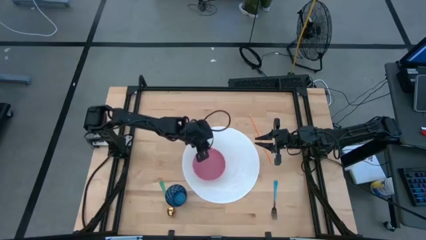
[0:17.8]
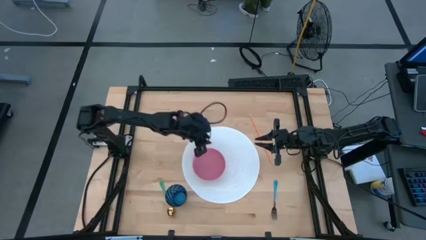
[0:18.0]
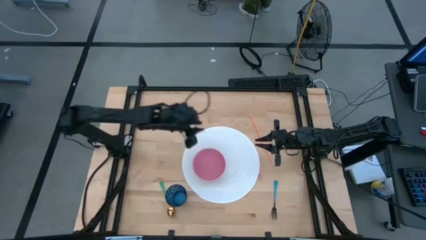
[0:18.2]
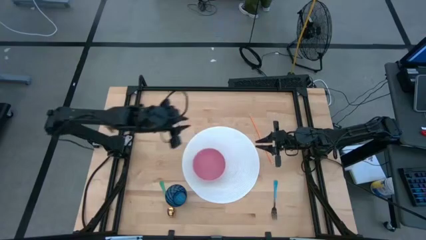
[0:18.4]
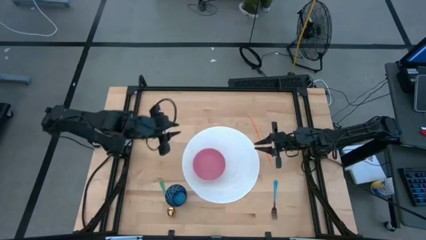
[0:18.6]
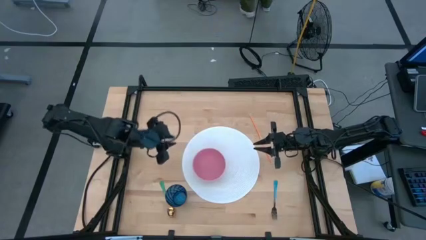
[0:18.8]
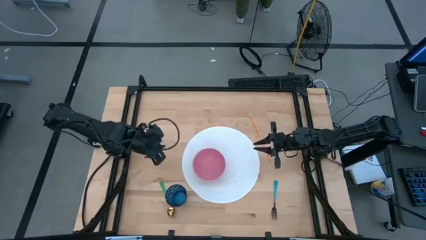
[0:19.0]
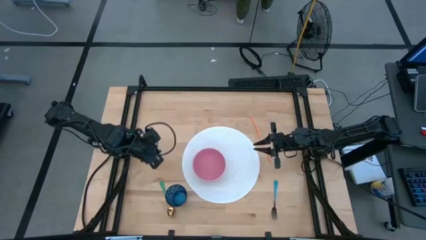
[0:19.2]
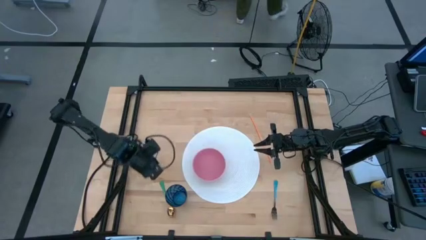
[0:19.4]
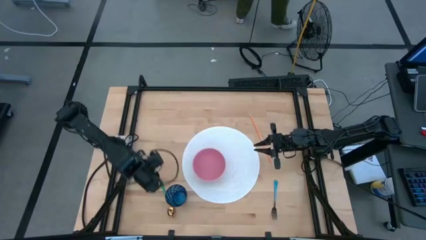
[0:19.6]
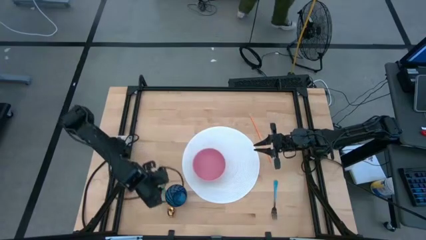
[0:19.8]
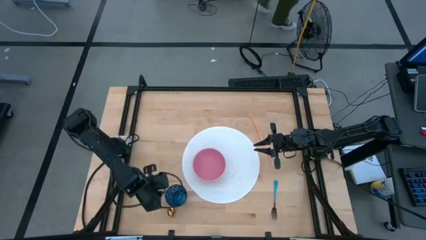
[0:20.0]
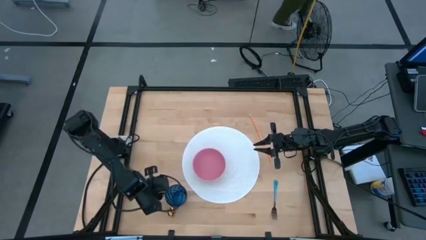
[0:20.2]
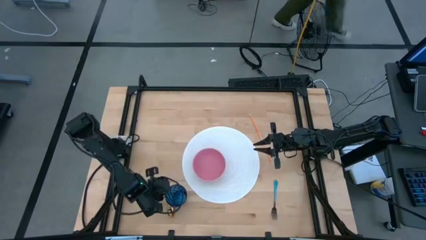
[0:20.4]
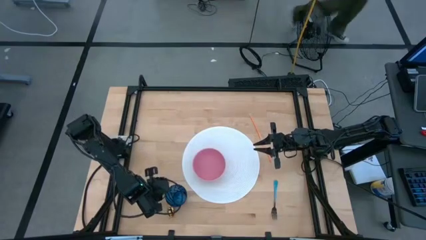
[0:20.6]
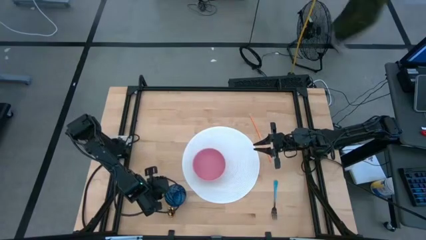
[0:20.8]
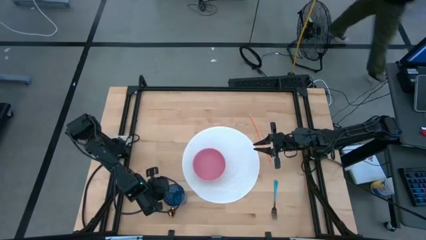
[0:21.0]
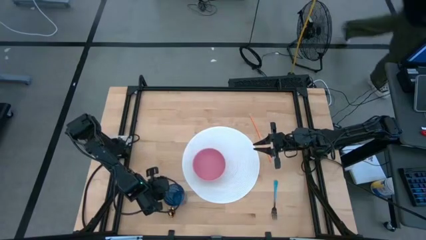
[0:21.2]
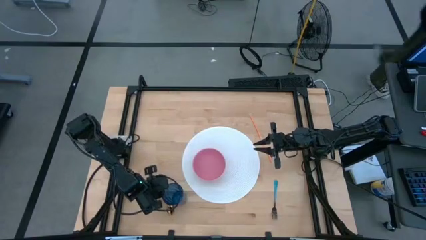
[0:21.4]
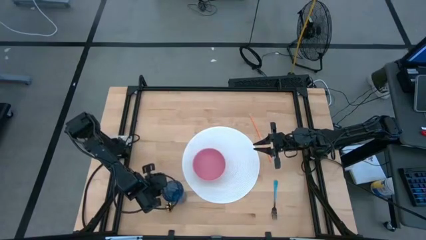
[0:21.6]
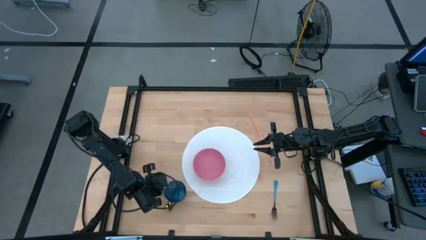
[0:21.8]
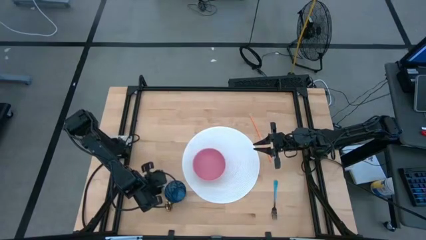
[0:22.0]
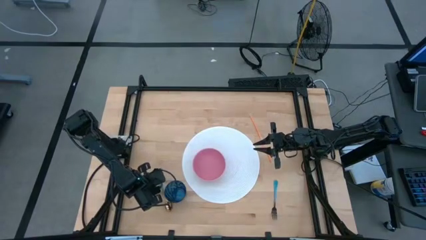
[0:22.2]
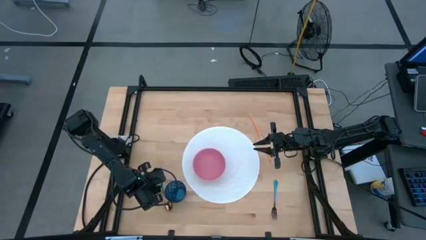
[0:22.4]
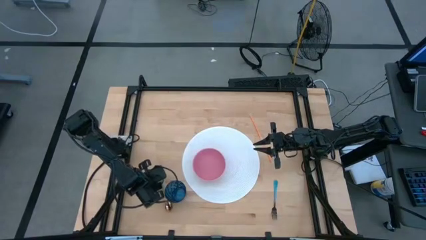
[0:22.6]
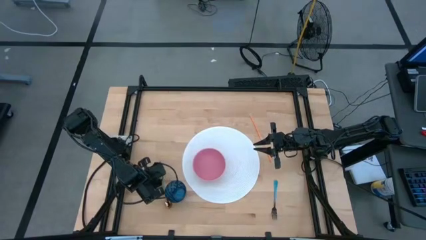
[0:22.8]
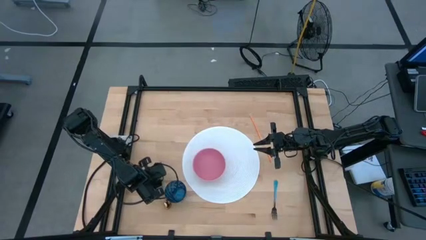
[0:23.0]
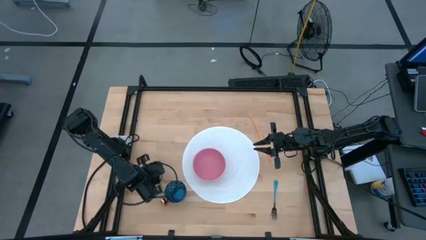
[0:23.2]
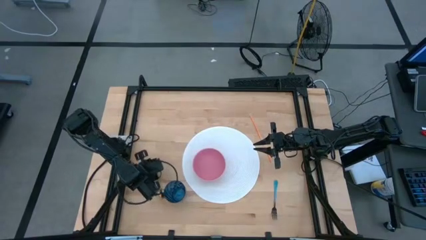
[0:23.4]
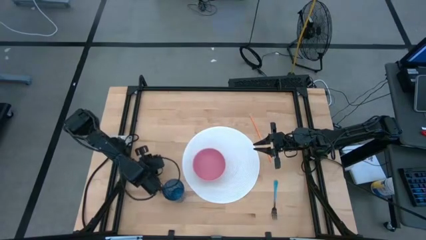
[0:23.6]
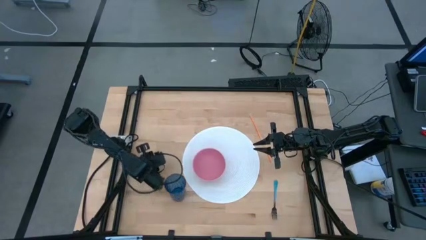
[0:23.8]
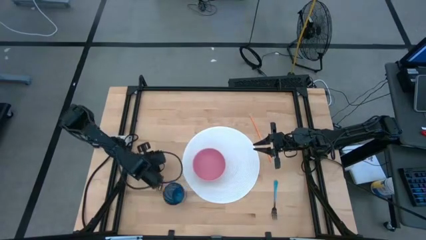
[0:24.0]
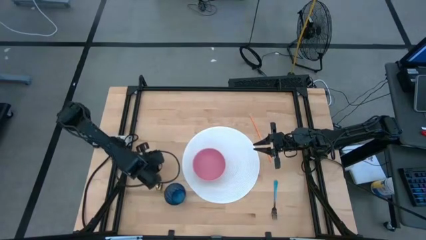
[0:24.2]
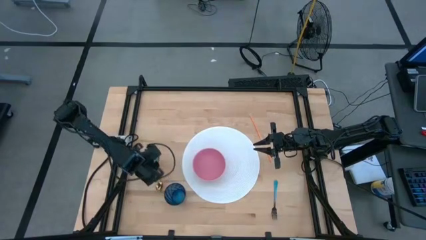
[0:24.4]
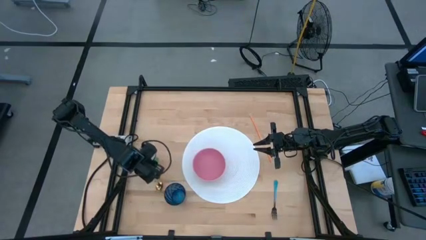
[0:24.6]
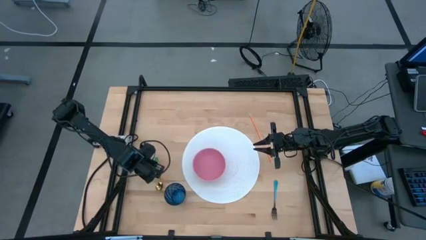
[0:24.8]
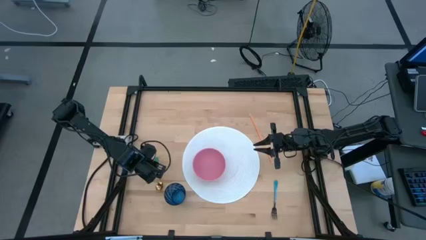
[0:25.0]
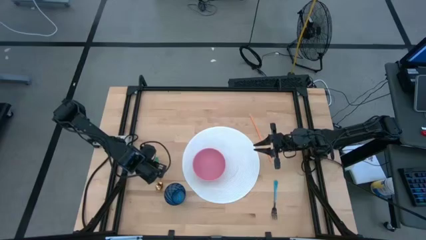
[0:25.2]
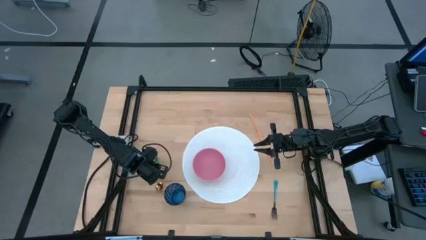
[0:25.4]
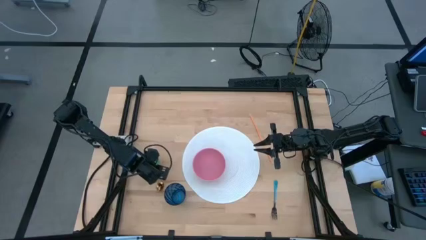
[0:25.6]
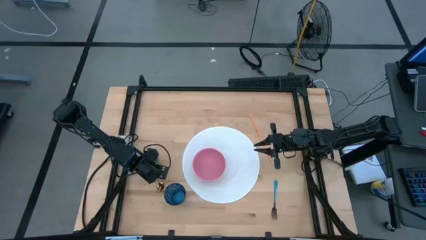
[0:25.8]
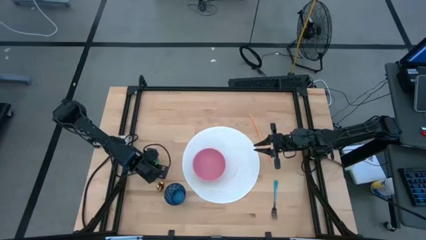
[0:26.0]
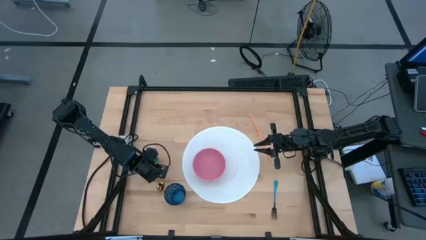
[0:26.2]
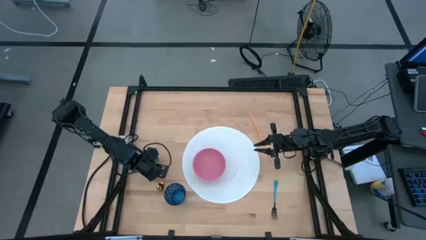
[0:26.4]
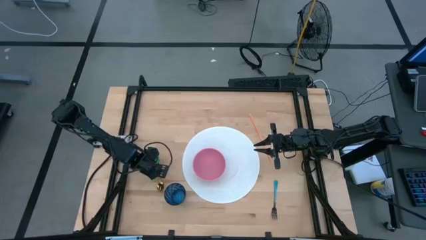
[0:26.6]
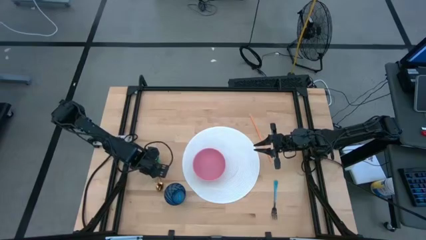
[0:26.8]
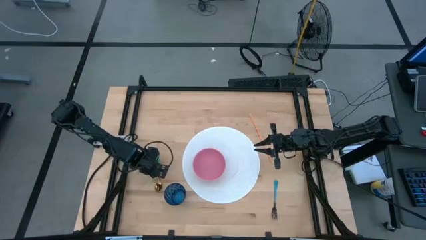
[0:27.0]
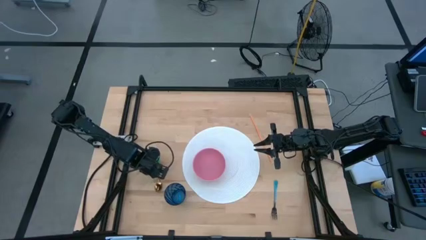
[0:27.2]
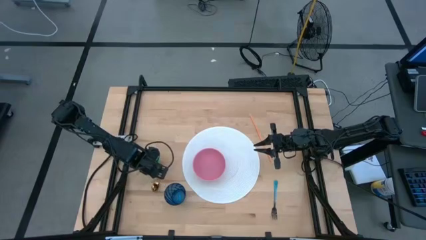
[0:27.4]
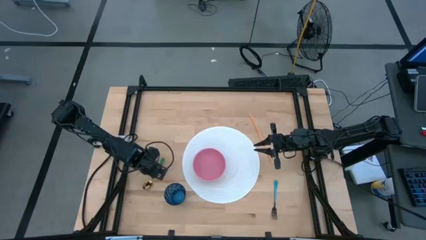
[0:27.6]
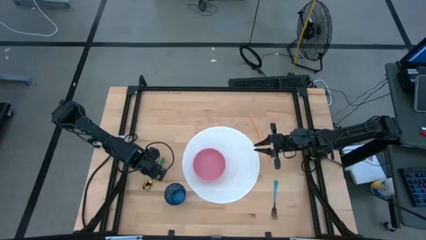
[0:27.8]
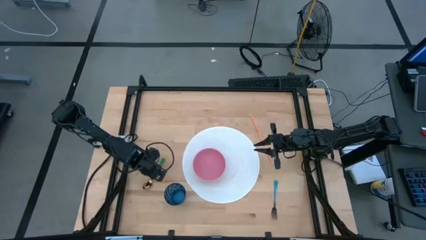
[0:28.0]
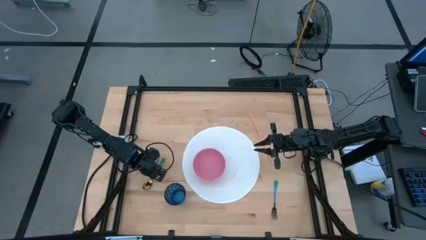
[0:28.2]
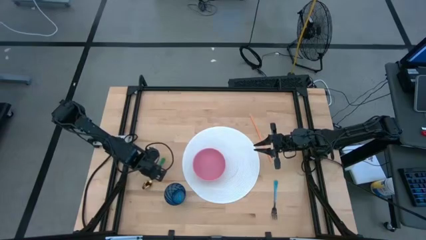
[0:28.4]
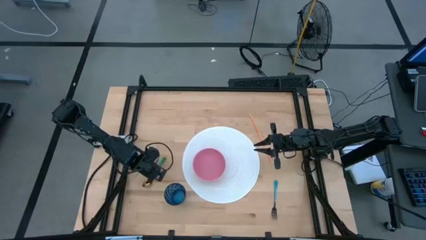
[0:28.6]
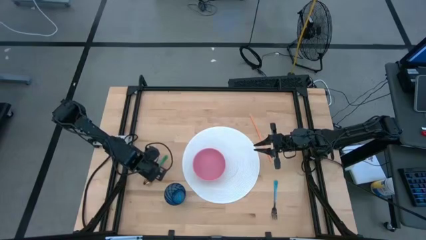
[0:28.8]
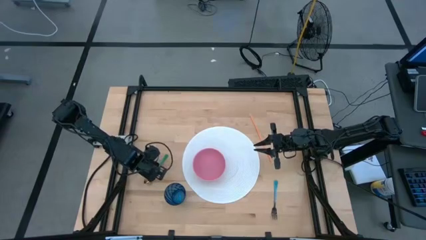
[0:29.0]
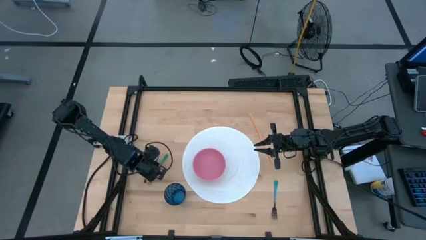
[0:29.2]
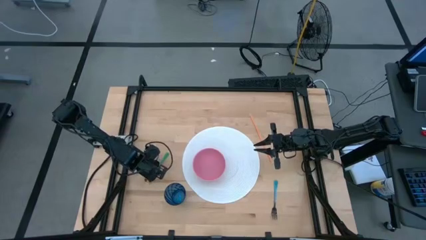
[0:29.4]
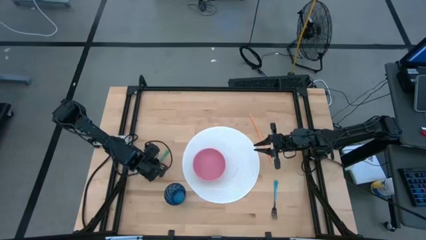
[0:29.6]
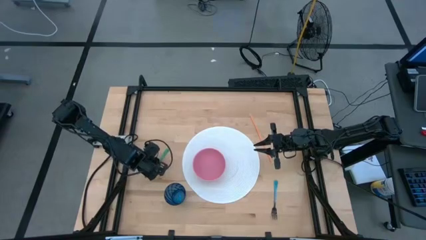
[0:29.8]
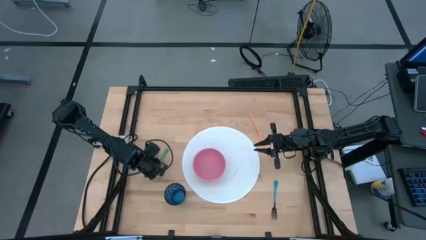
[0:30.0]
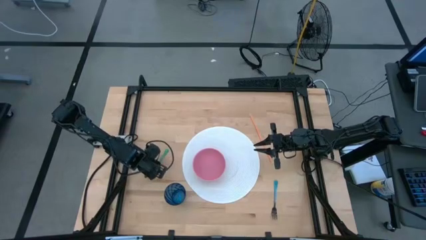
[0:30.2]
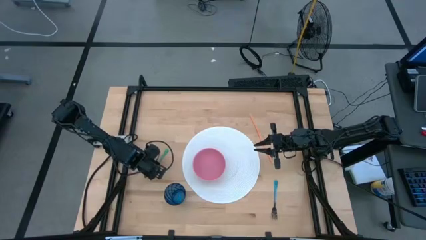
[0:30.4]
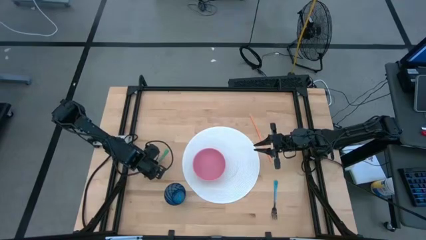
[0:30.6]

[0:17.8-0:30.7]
Task: Pick & Place Utensil
Put the green spoon into the pink bowl

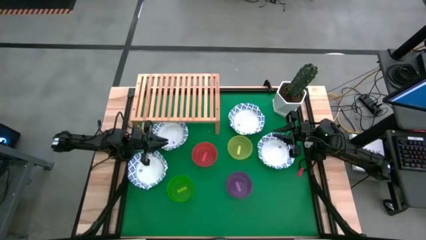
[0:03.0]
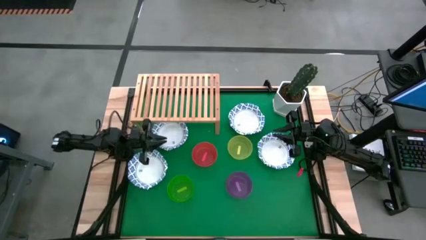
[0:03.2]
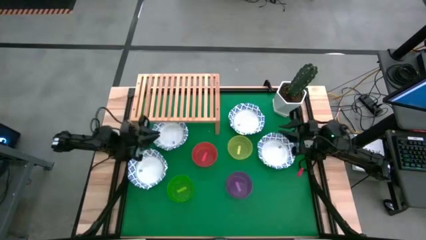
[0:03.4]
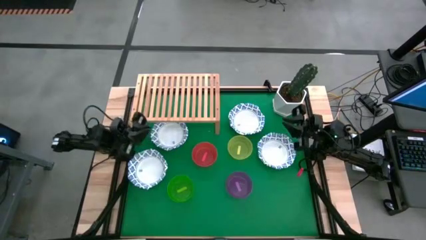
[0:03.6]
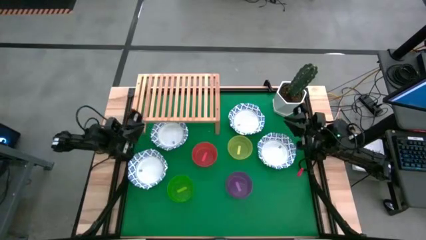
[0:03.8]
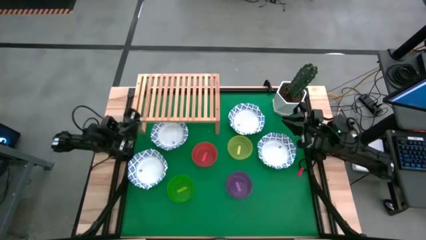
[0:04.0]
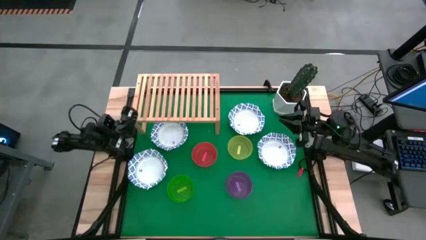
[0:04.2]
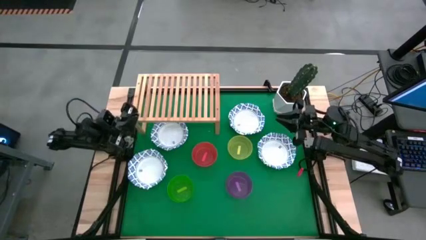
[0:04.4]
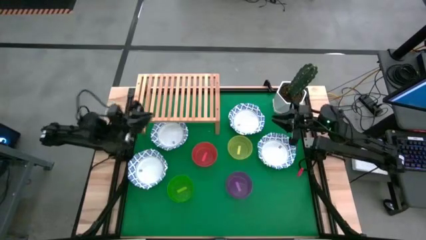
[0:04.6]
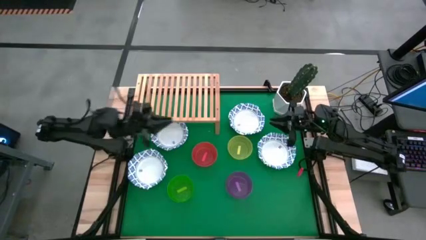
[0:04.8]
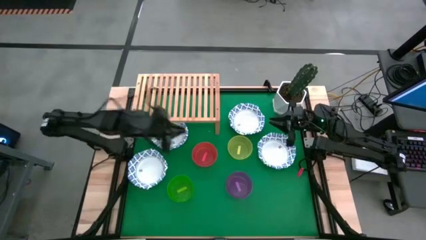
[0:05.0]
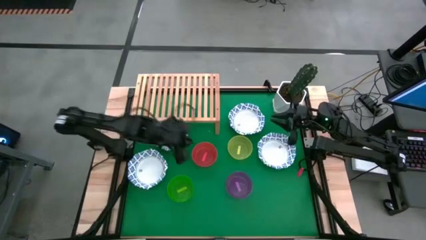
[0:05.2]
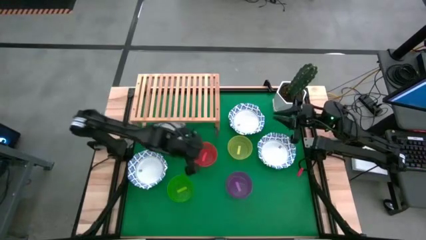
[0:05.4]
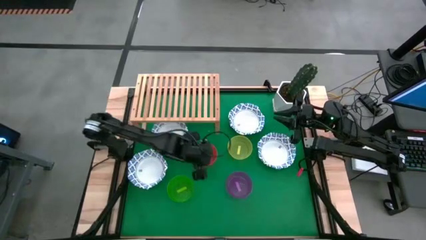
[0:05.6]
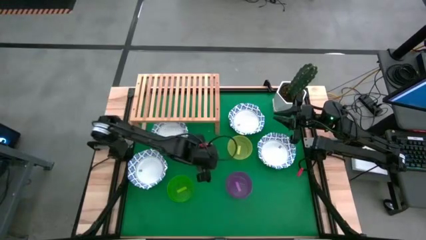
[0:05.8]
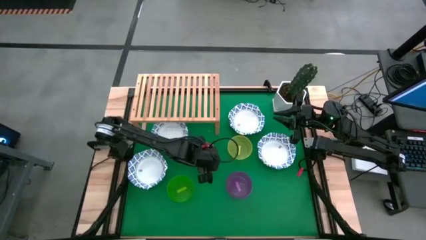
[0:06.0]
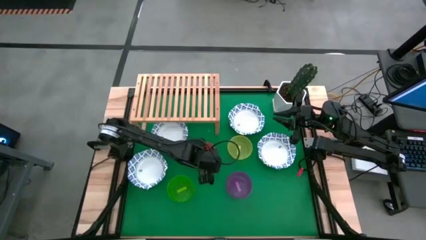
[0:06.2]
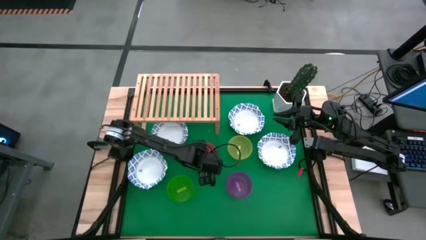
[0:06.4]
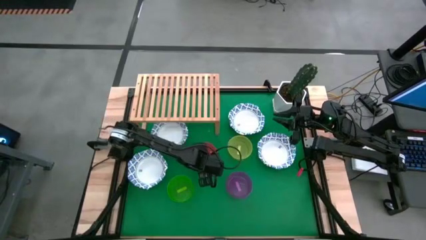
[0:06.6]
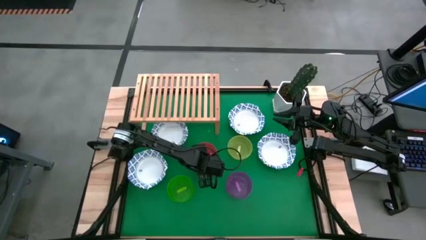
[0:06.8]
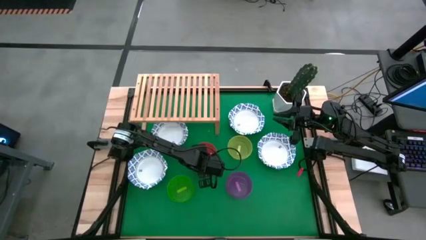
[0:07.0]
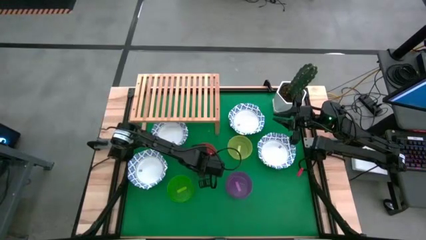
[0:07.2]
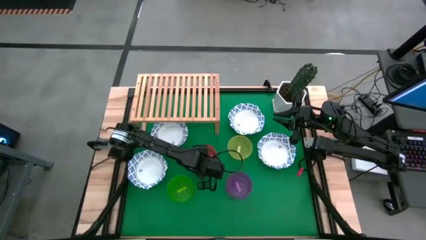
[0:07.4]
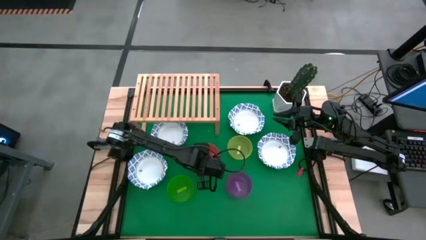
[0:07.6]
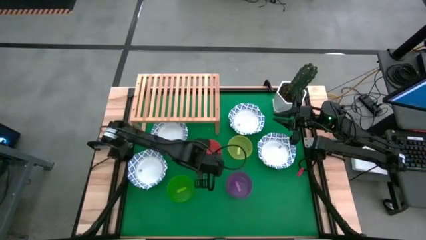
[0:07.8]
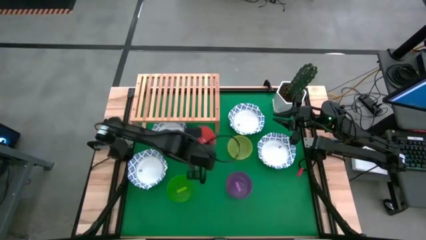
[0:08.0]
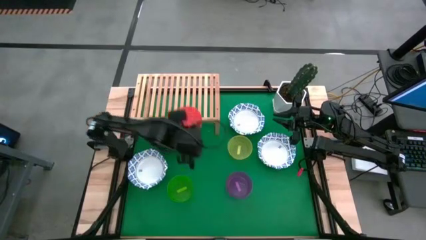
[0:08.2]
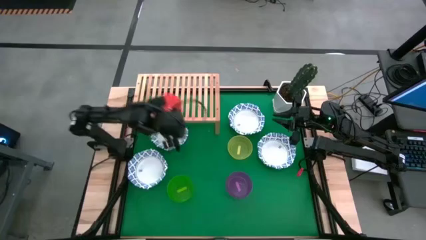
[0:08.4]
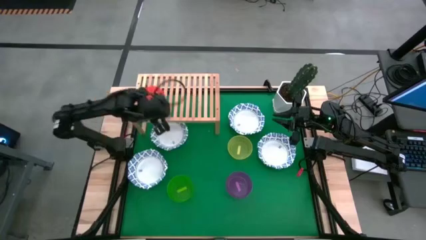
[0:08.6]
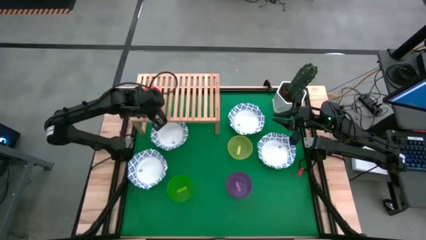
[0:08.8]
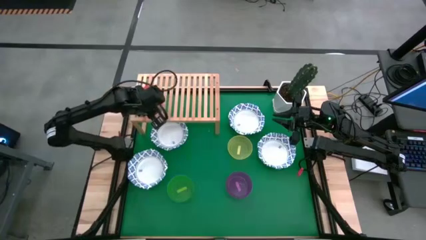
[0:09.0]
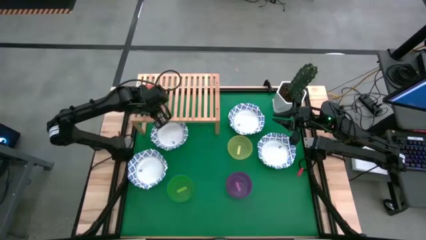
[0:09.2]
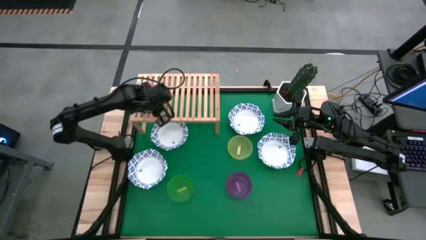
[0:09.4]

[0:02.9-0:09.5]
Task: Place and stack bowls onto a shelf
Put the orange bowl on the shelf
